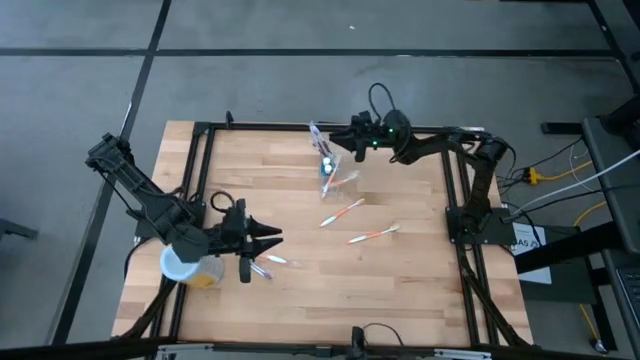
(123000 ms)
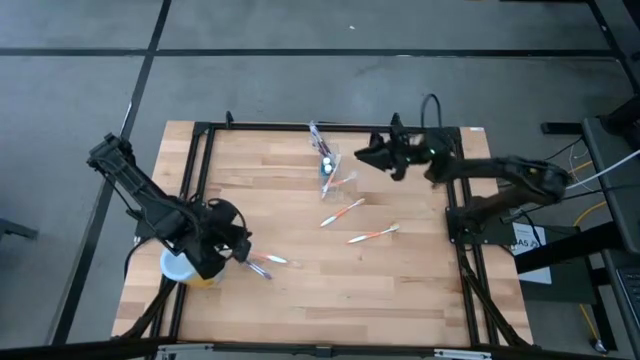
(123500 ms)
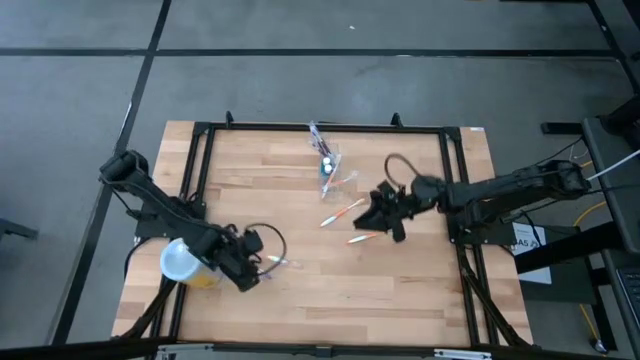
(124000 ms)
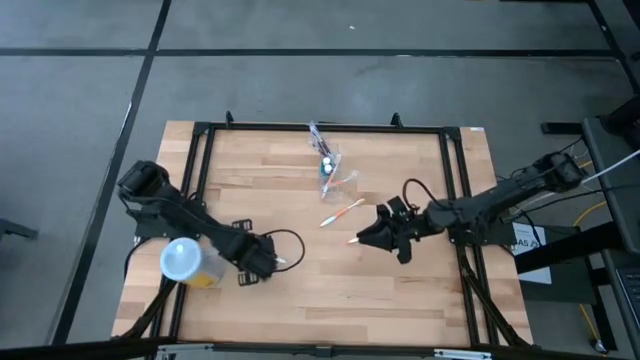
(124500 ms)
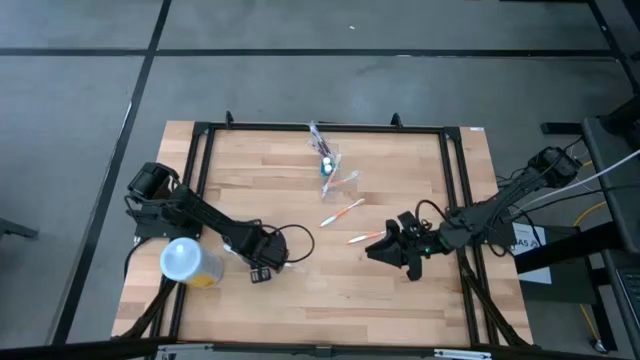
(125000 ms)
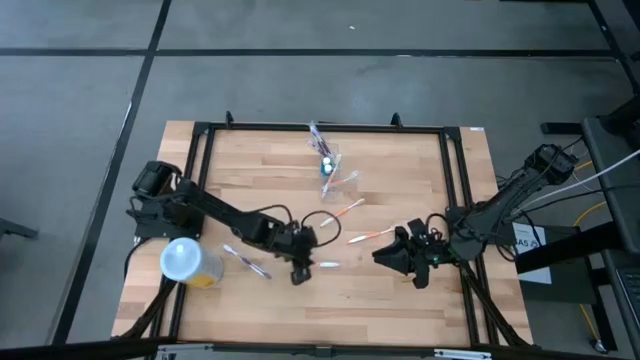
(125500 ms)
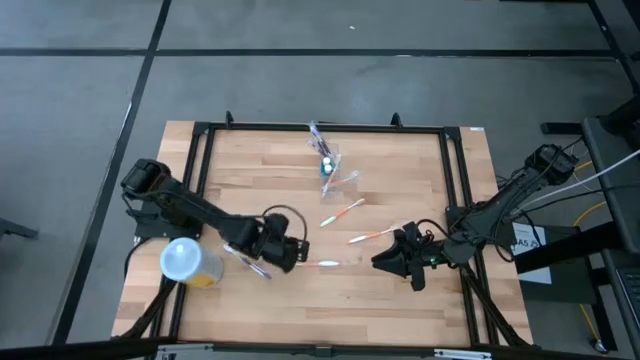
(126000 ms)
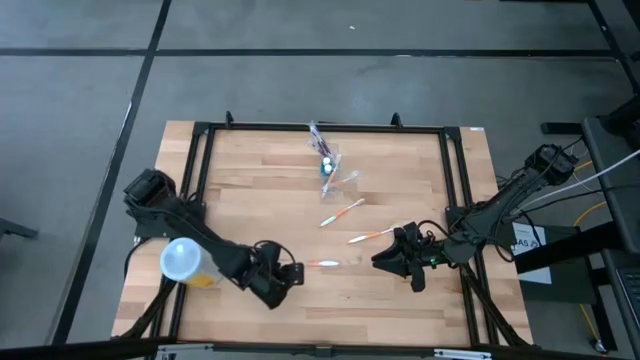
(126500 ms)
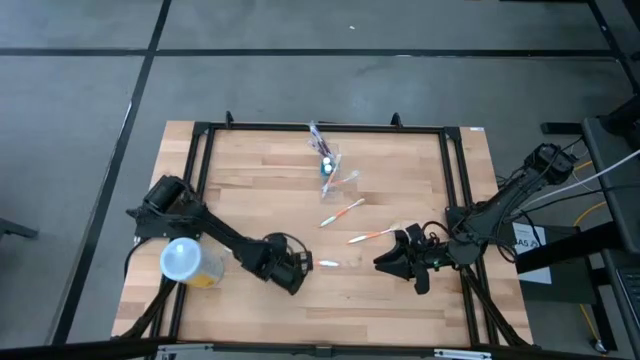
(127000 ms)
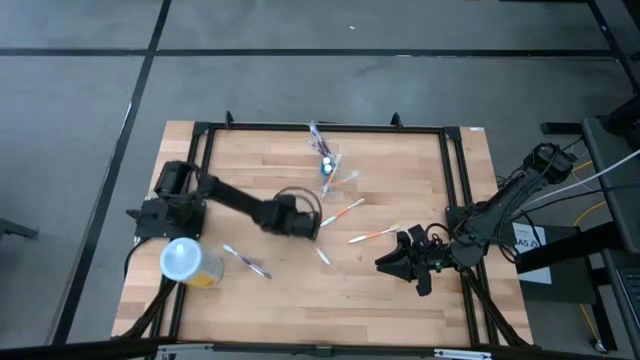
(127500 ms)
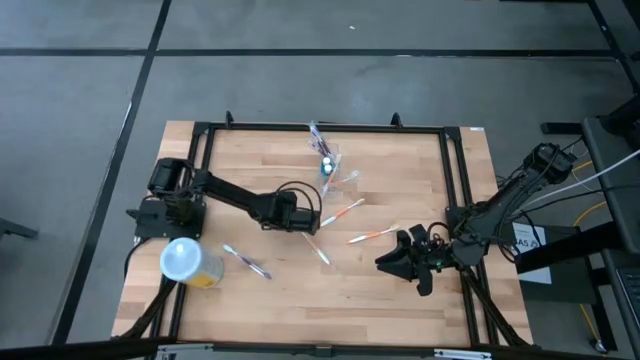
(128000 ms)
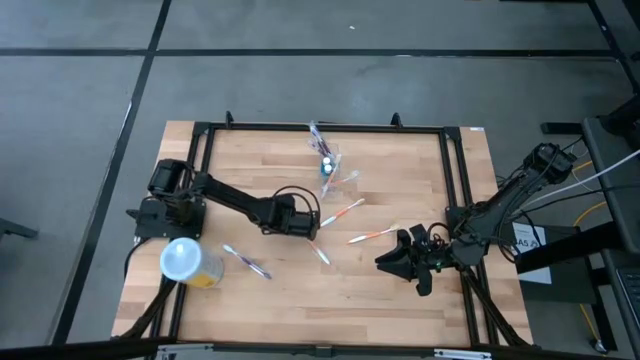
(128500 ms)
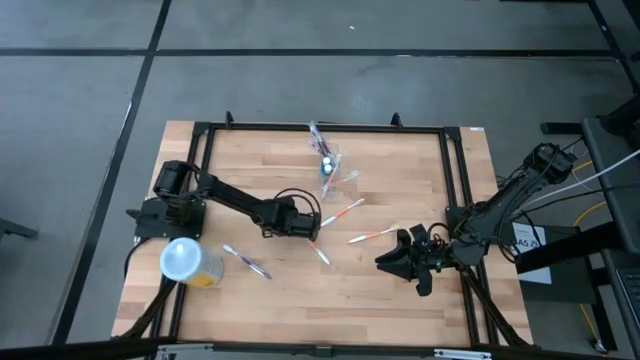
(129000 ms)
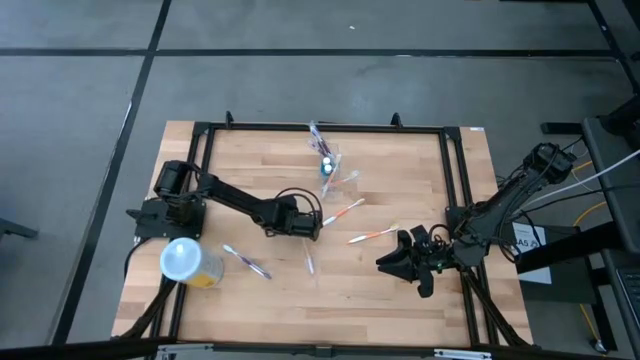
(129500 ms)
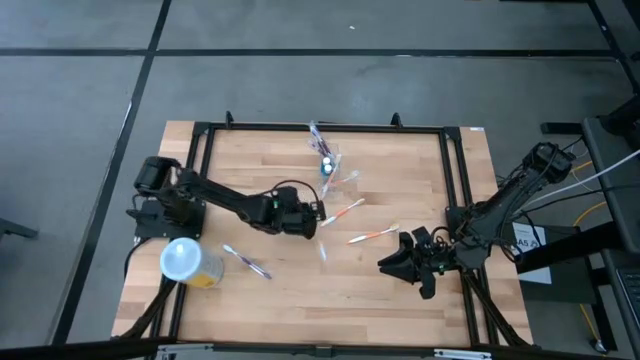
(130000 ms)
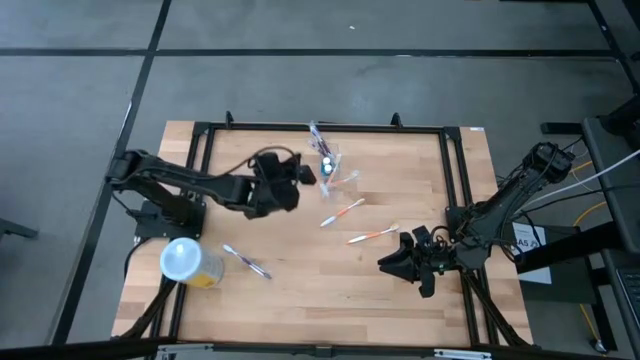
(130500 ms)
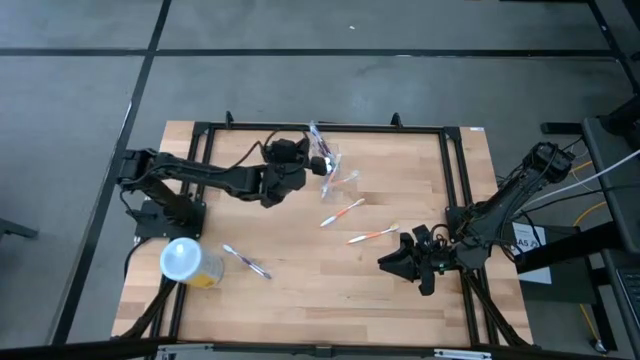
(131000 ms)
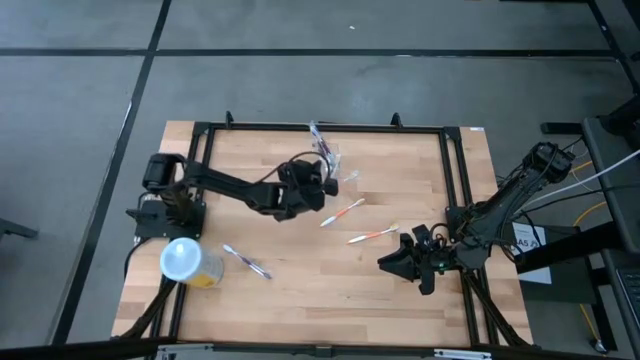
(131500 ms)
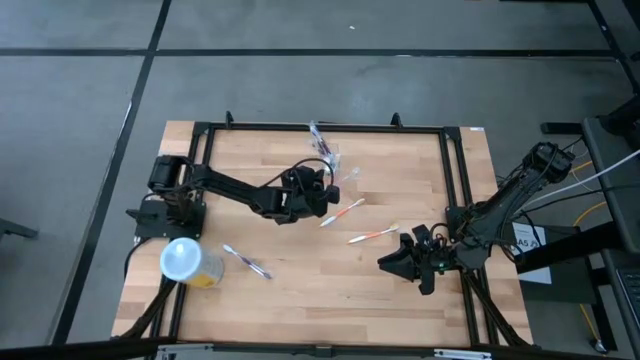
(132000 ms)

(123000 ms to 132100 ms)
Task: Pick & Place toothbrushing station
Put the orange toothbrush into the transparent organizer

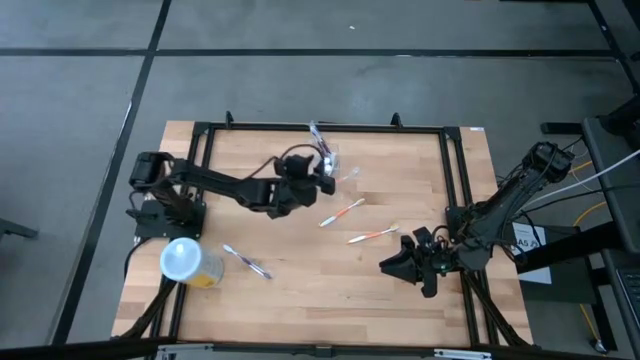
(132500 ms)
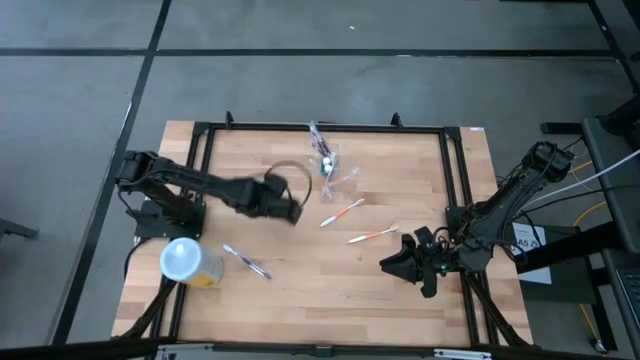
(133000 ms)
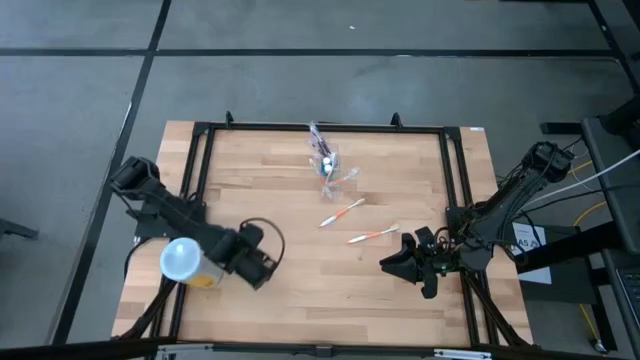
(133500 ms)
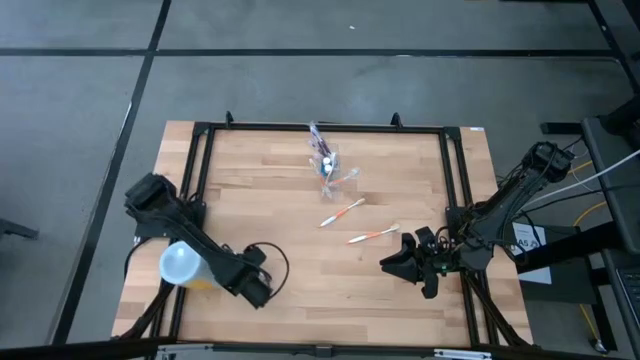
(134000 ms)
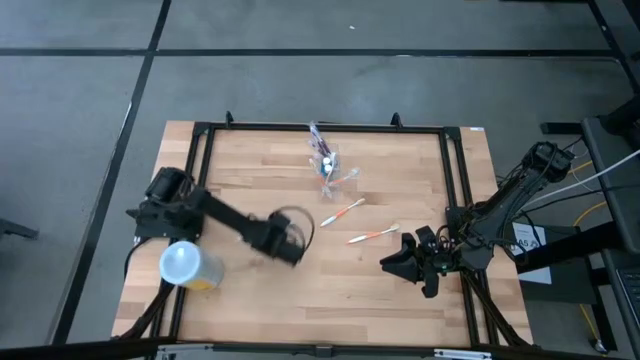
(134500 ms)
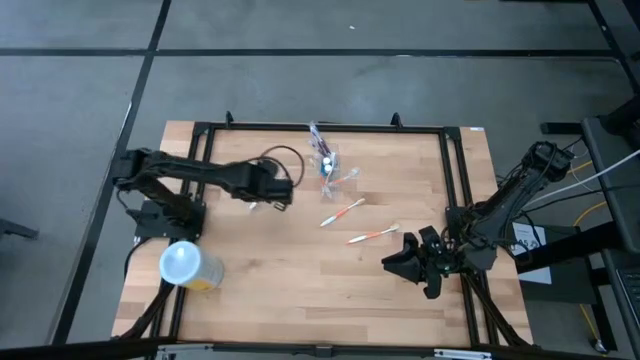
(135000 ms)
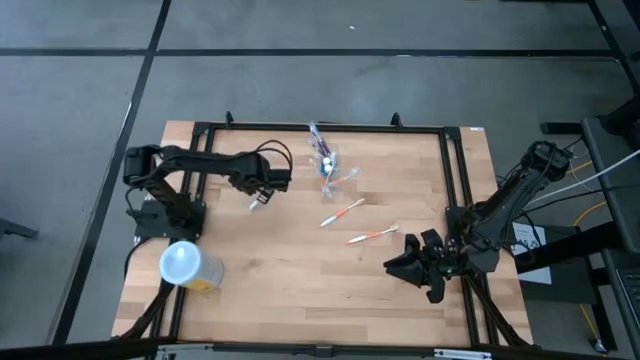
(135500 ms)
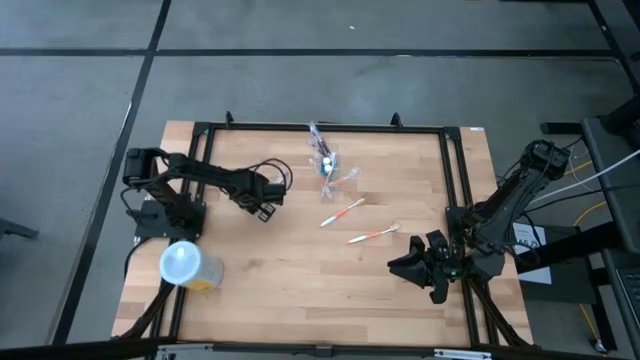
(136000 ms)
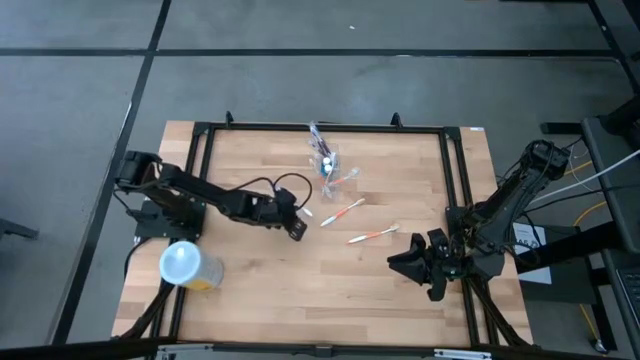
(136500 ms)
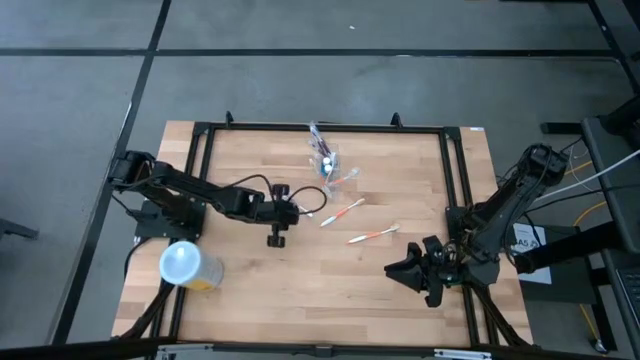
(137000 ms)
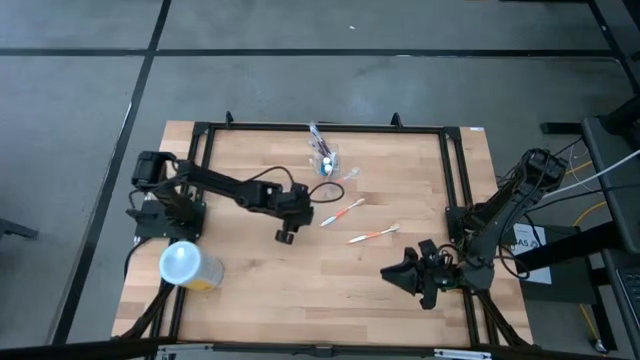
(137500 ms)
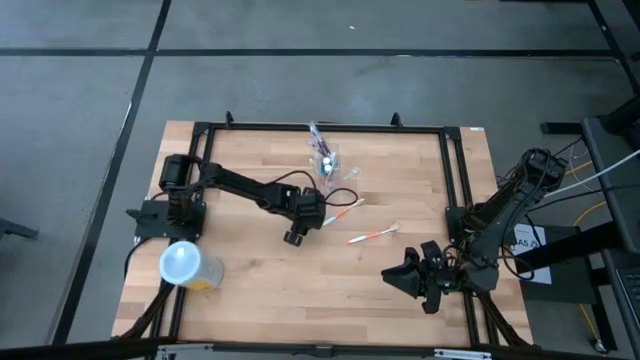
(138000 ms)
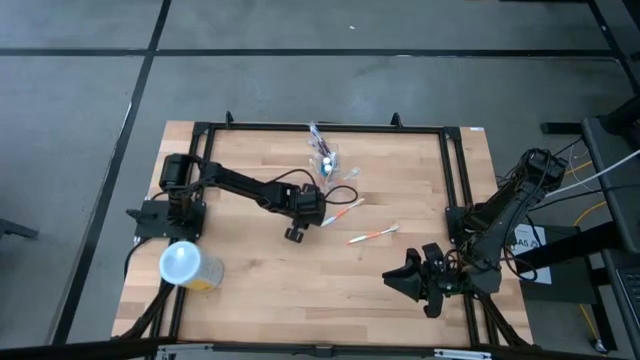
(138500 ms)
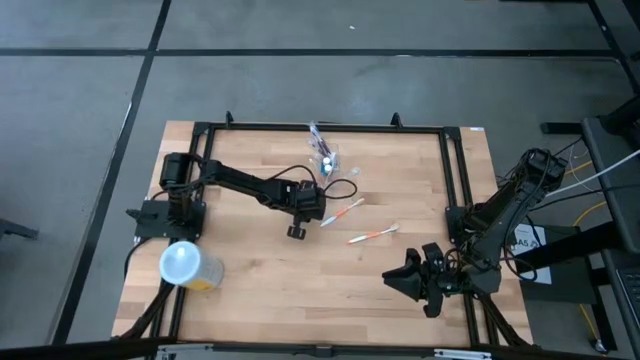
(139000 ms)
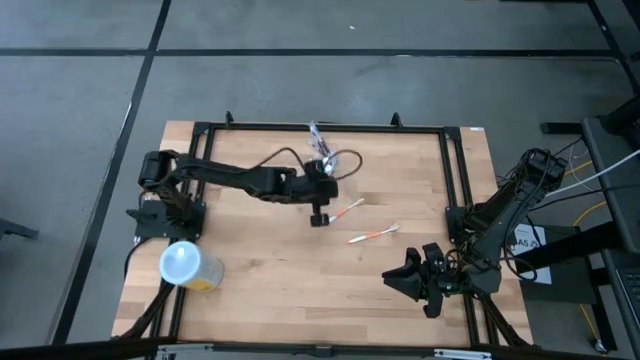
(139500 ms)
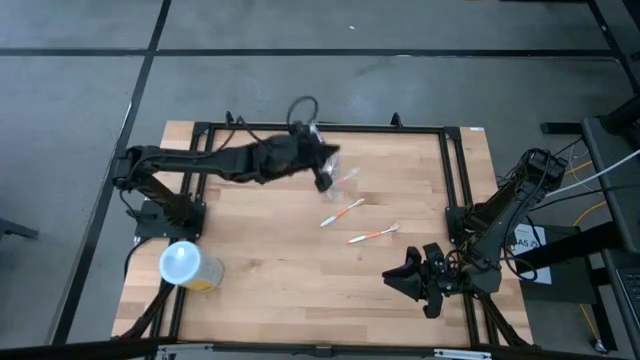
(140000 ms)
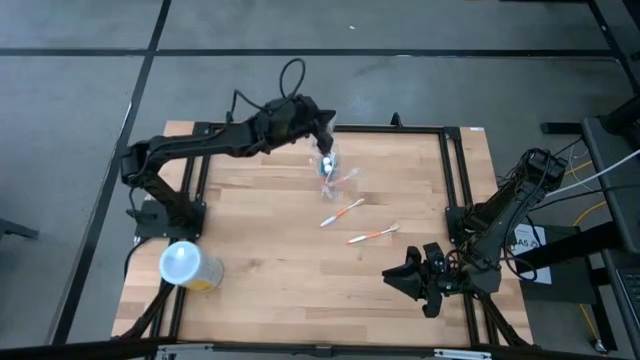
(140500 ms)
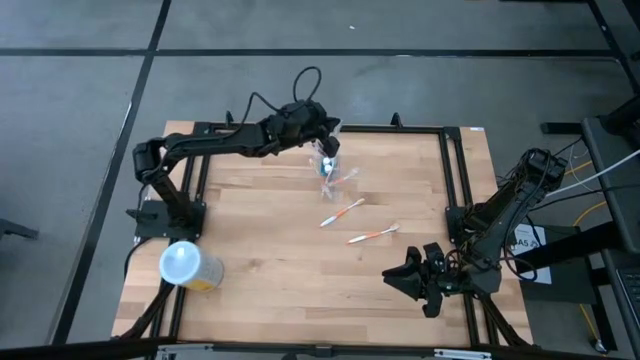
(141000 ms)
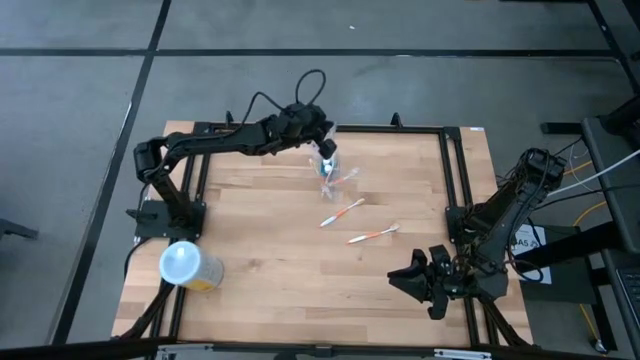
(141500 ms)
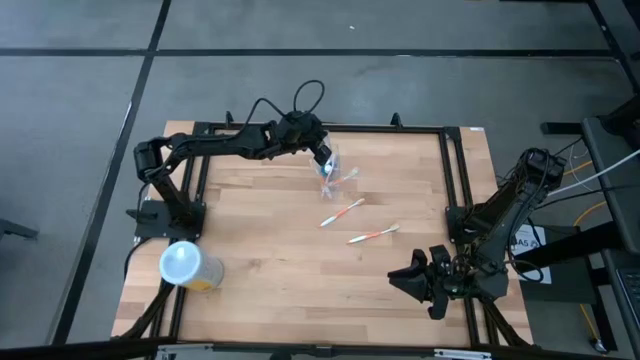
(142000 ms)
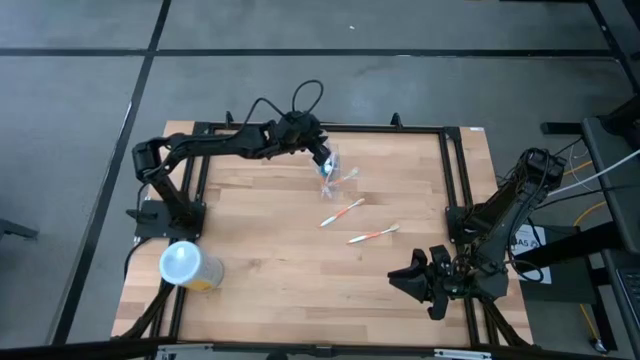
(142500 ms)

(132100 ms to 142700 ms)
Put the purple toothbrush into the transparent organizer

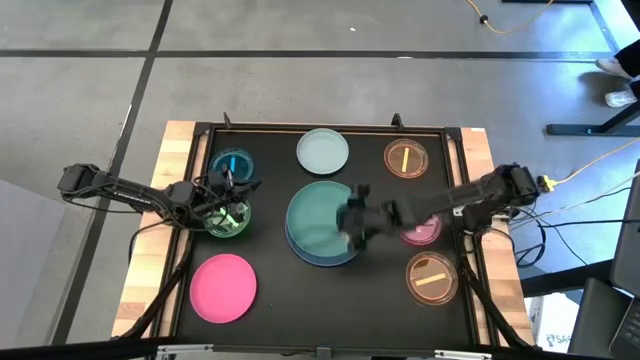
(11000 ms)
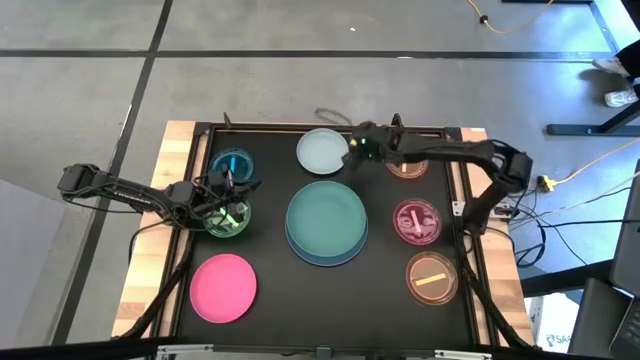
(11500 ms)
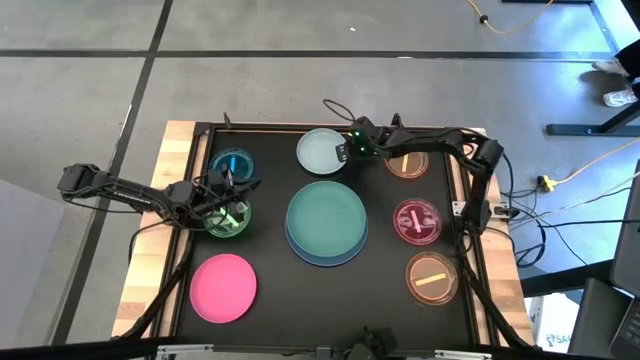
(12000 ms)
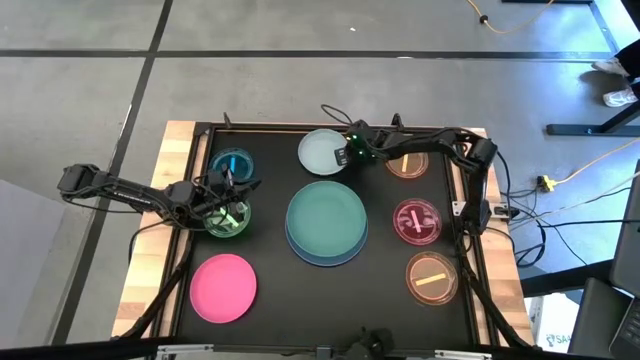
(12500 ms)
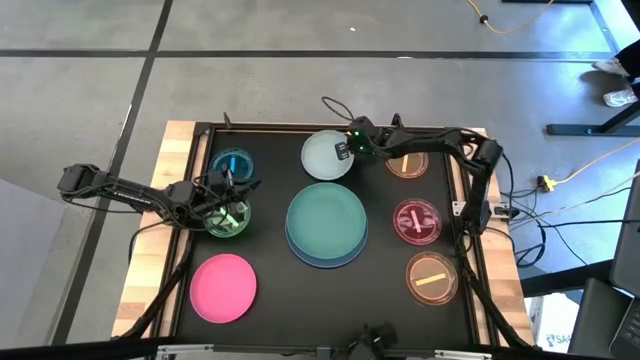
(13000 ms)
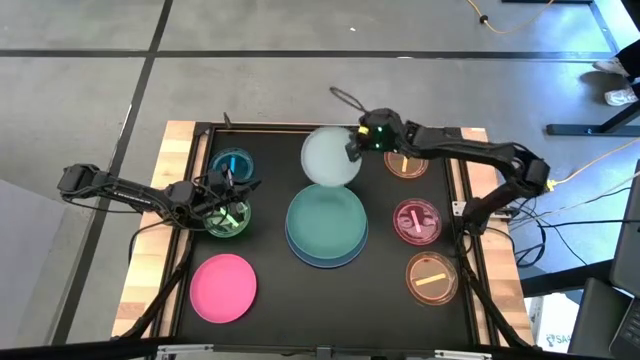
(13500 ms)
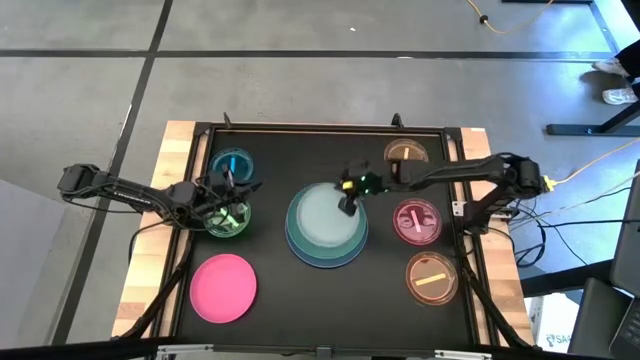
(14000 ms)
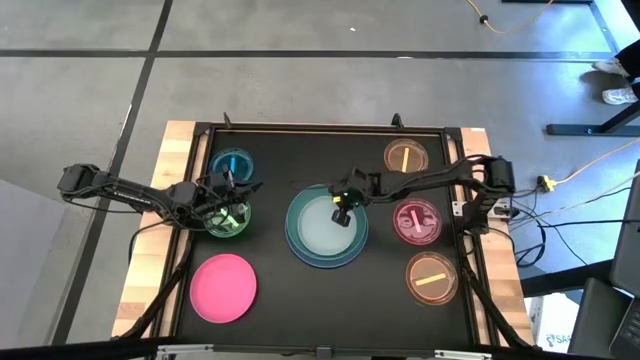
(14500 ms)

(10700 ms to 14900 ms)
Task: Stack plastic plates
Stack the gray plate on the green plate
